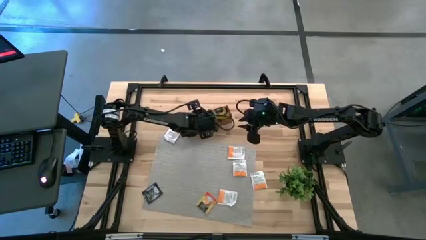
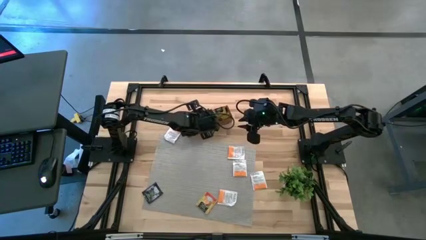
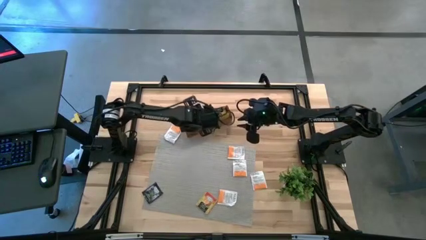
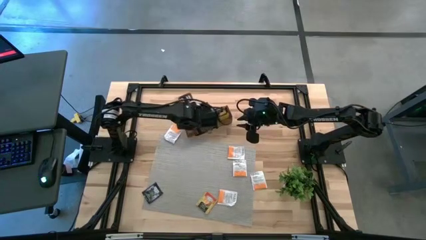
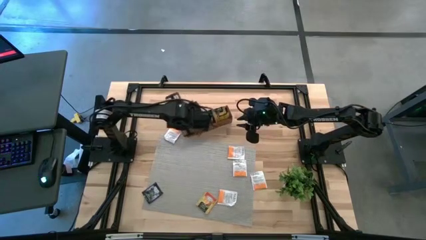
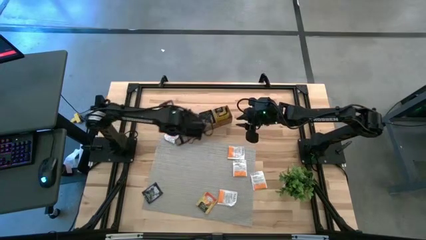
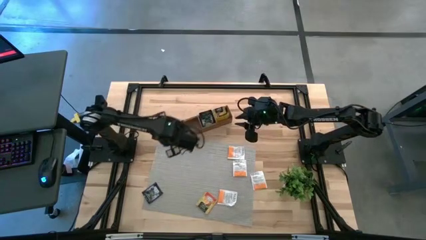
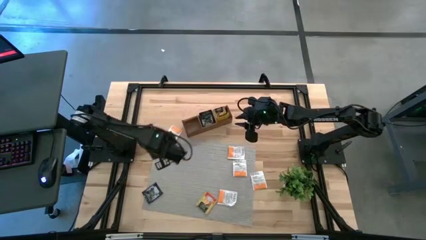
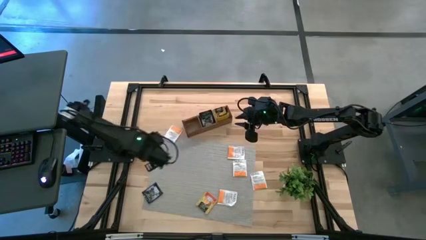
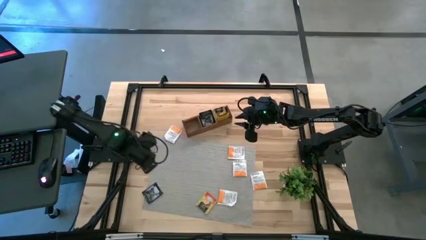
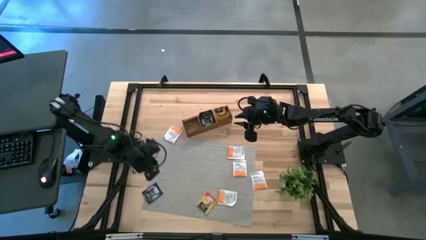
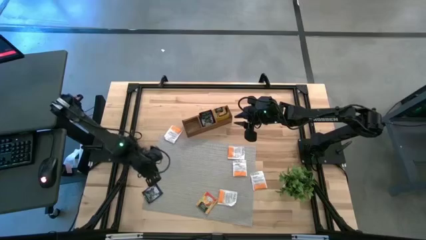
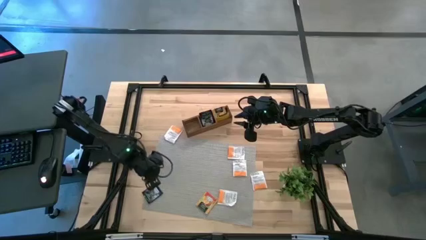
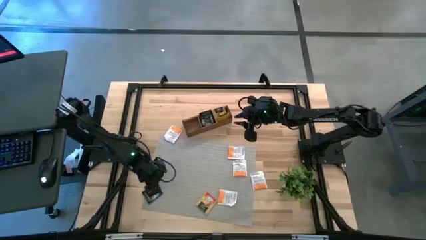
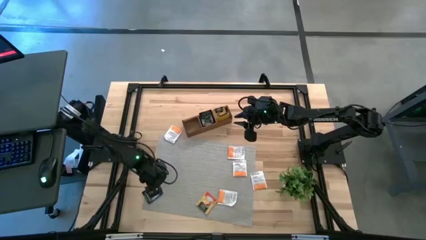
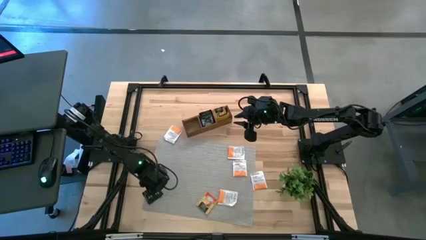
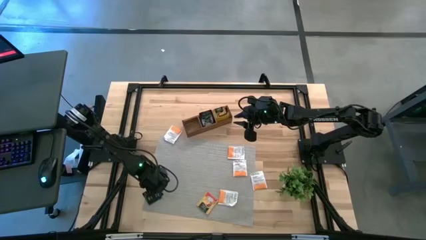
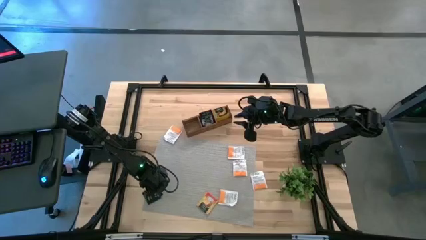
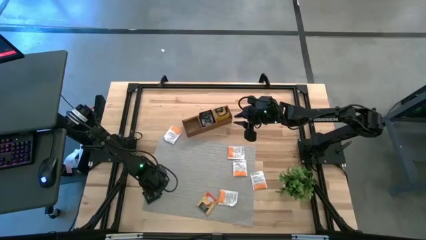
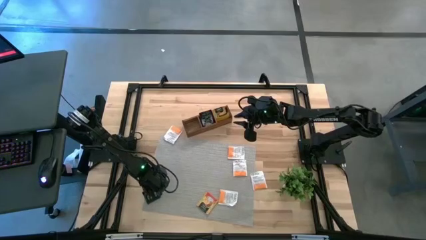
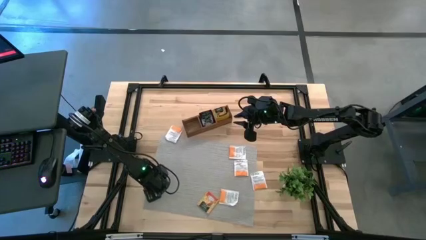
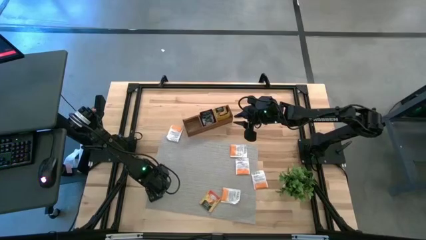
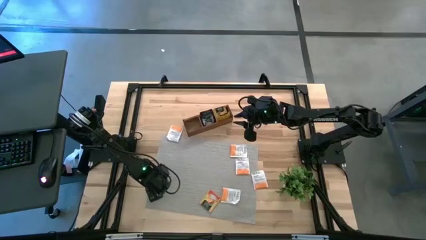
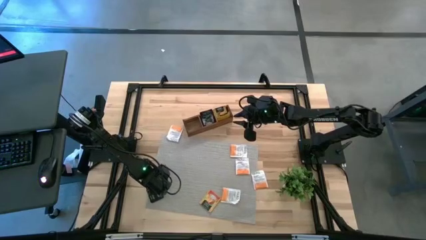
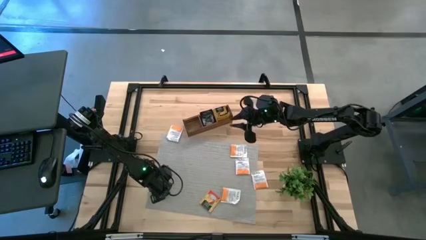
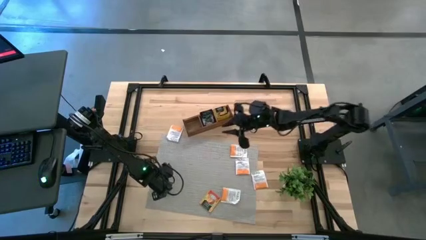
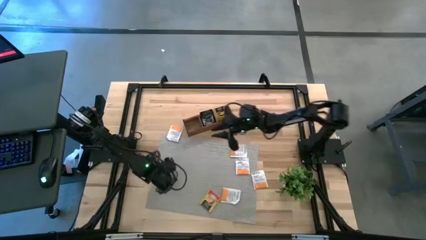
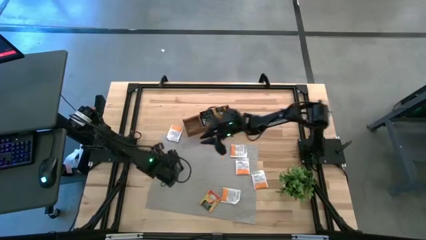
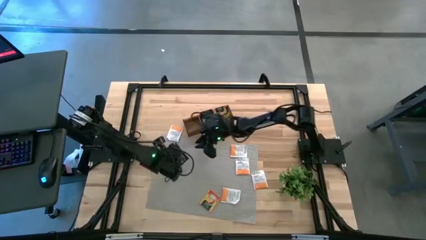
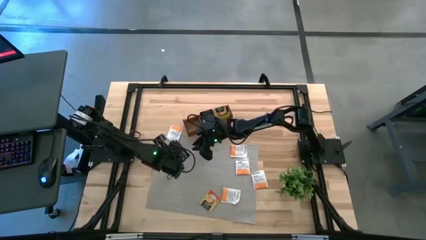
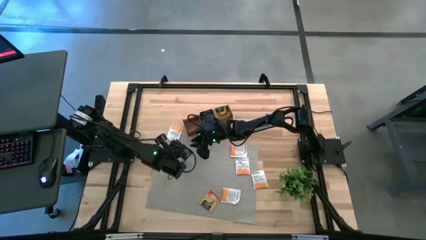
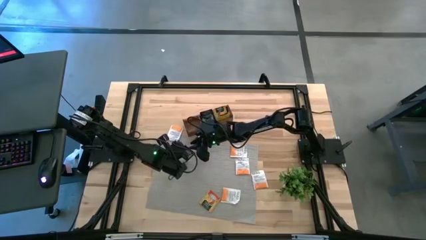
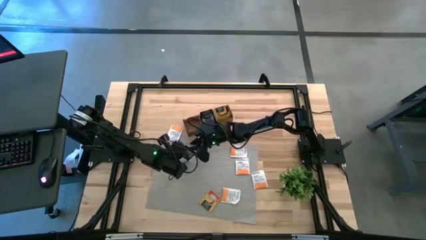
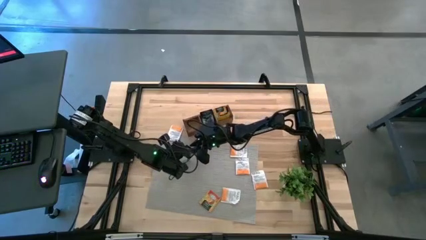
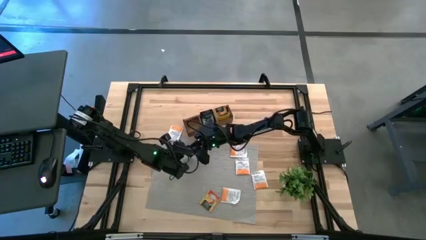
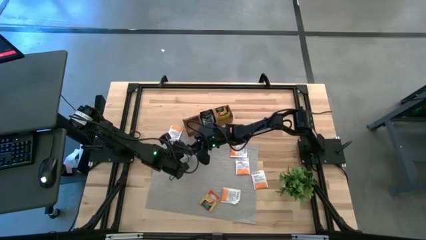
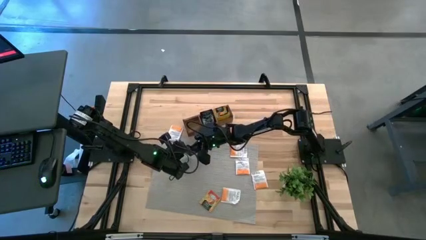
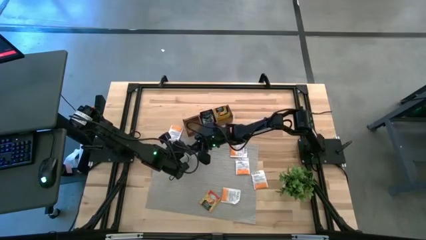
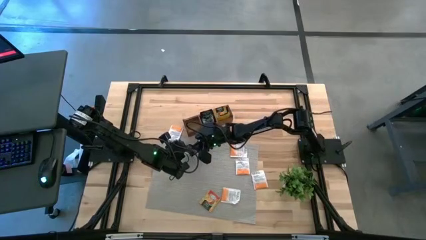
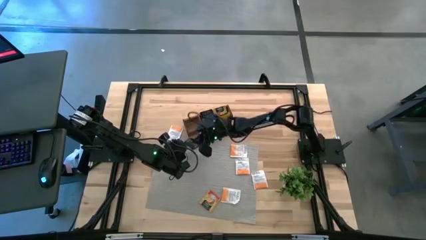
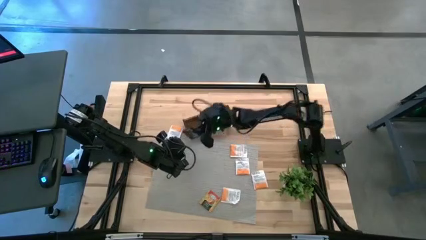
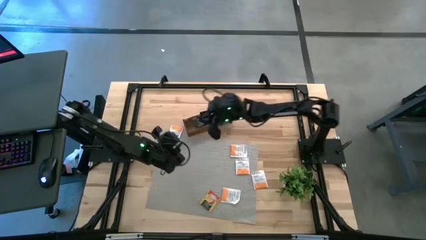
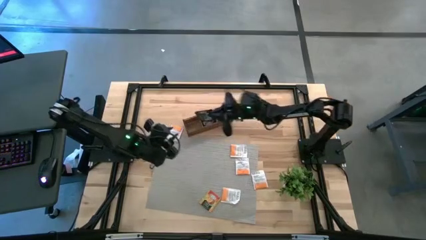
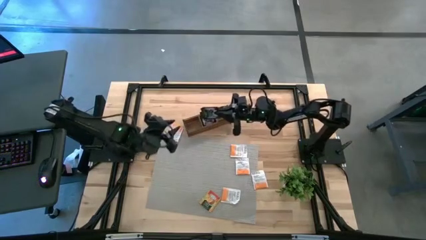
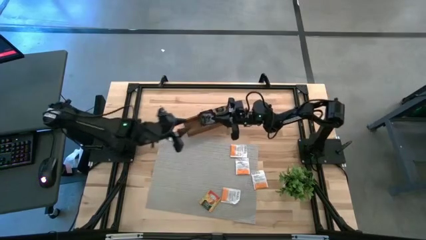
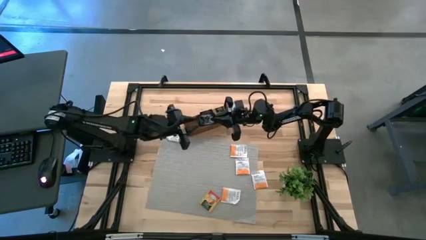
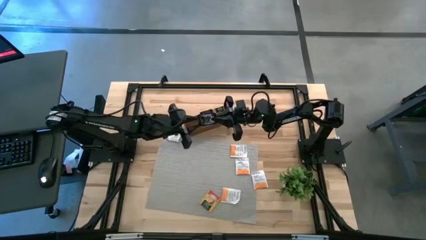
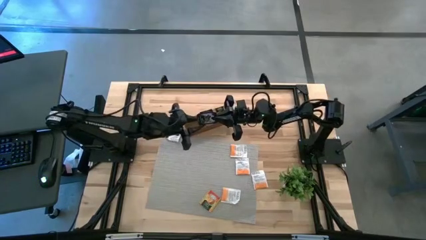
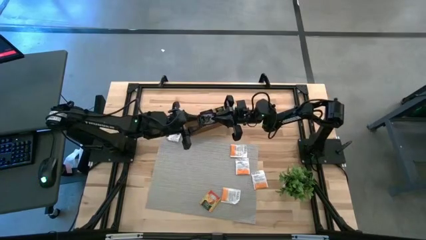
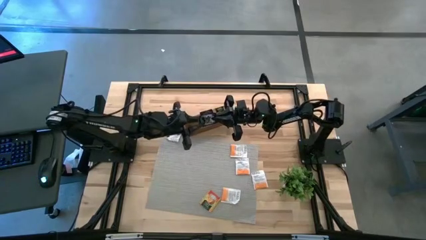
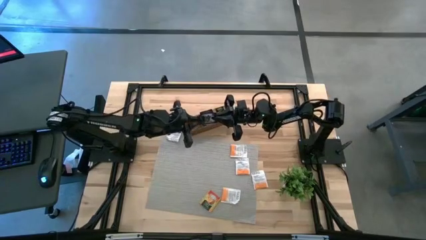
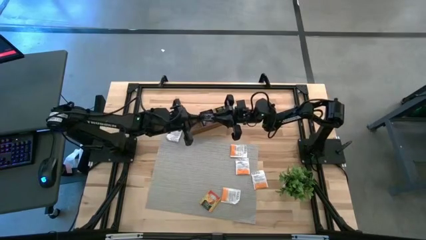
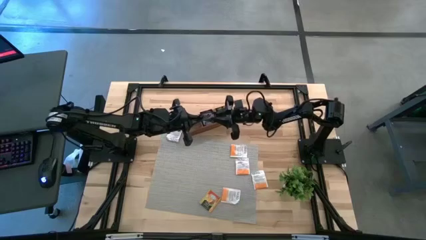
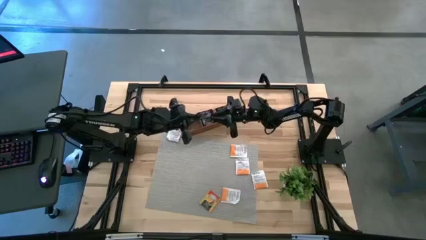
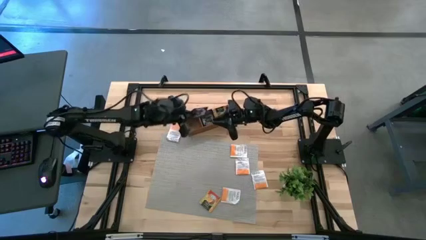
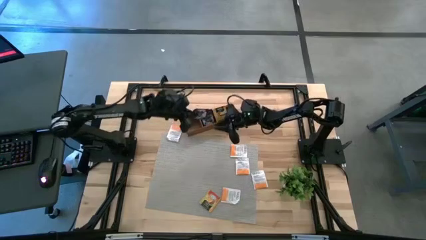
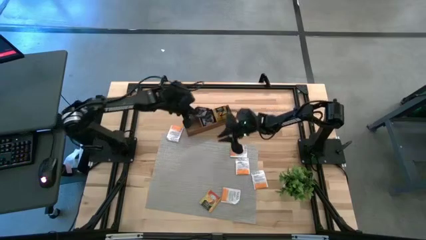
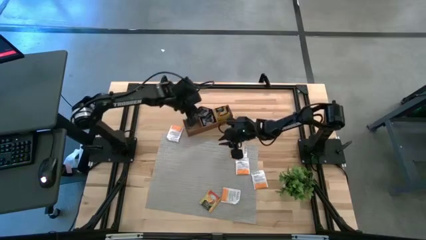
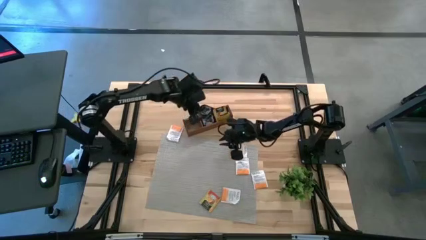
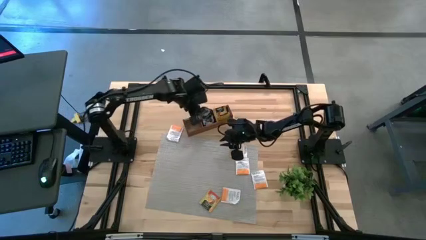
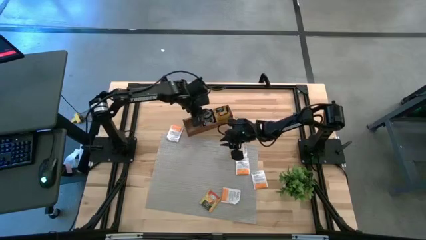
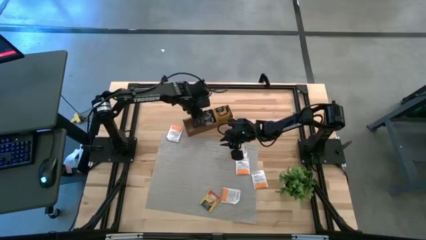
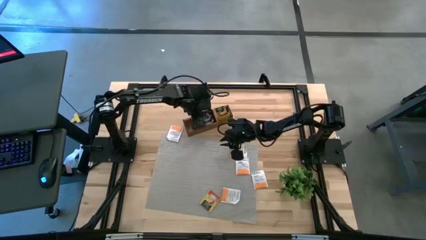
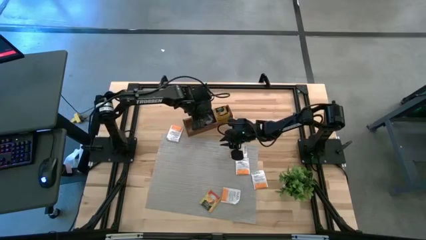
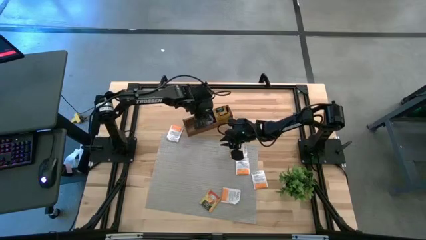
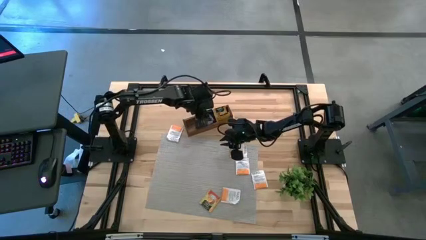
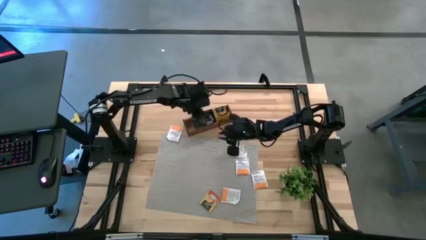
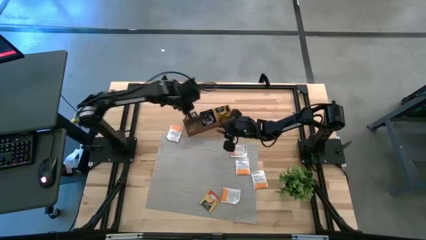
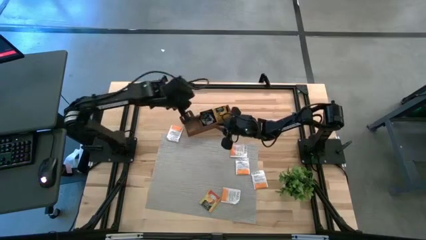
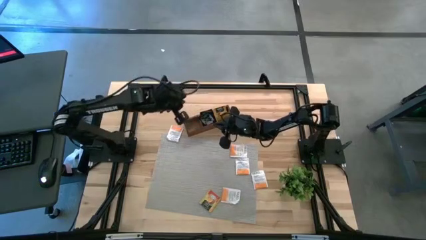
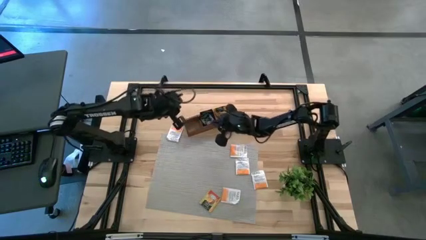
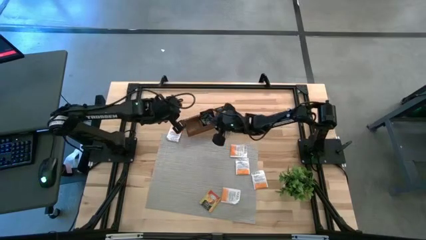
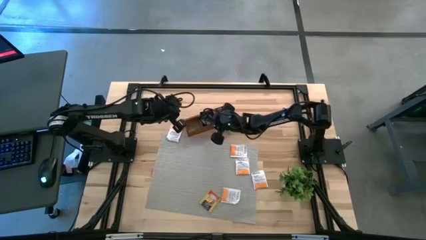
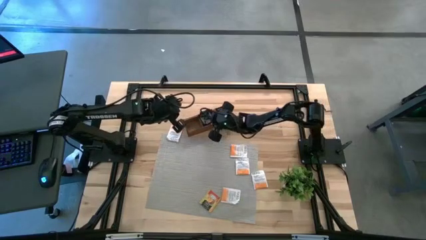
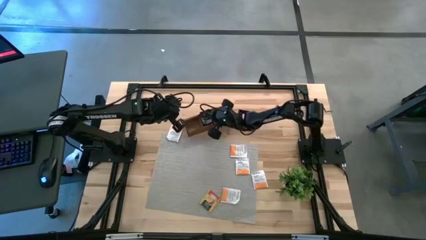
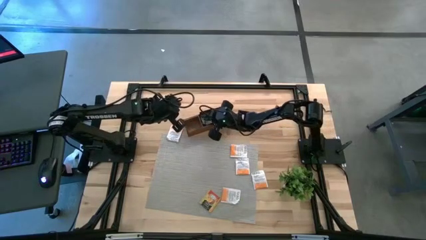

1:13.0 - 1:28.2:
Task: Pick & Place Tea
Put the violet tea bag into the middle section of the wooden organizer

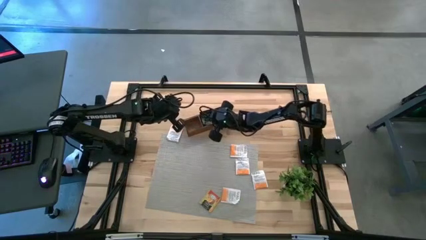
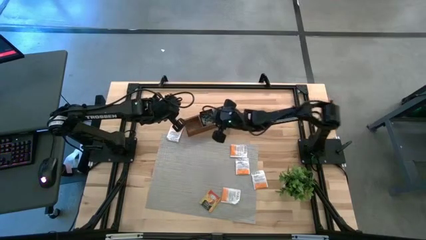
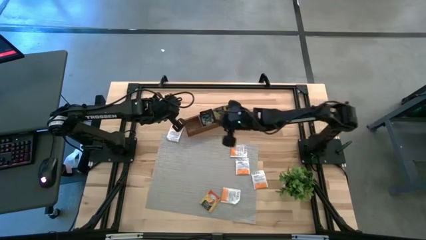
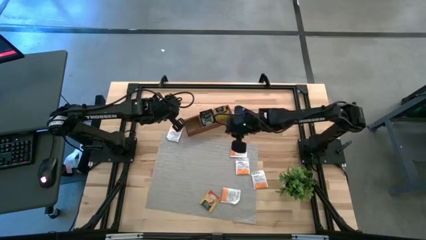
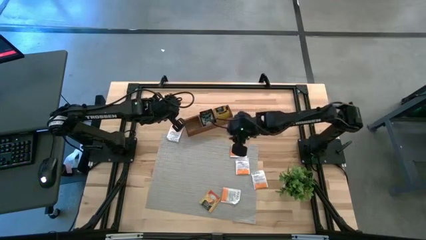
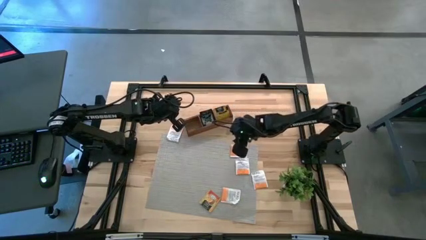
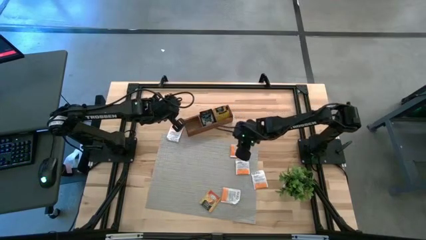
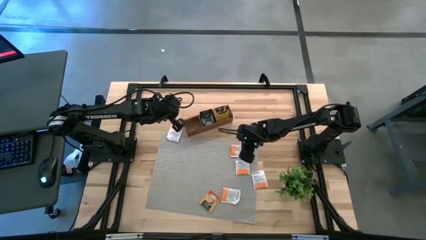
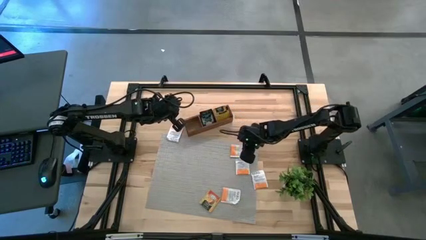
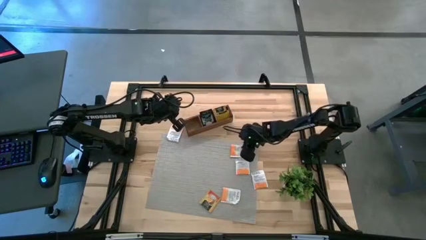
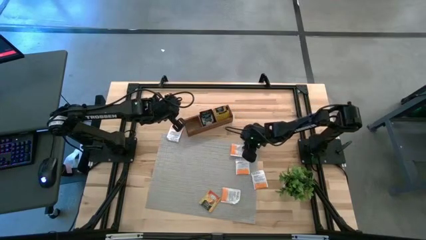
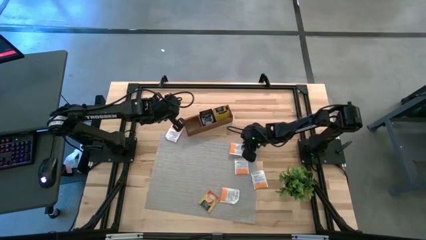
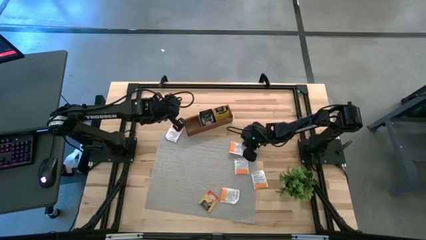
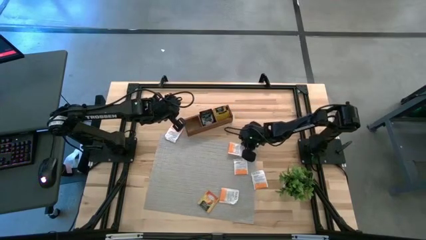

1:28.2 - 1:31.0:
Put the orange tea bag into the left section of the wooden organizer
